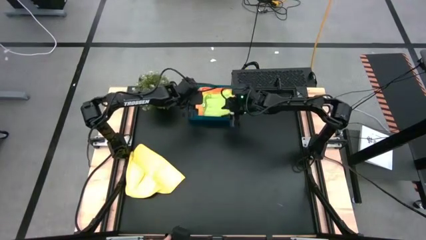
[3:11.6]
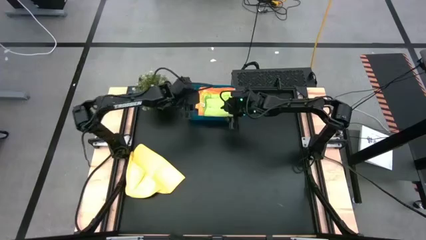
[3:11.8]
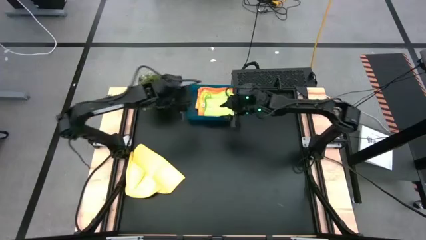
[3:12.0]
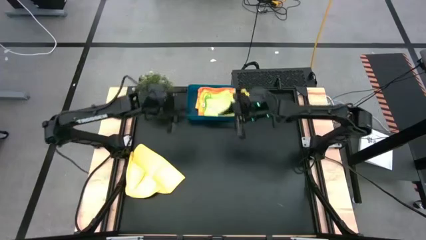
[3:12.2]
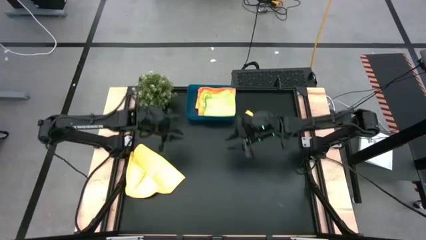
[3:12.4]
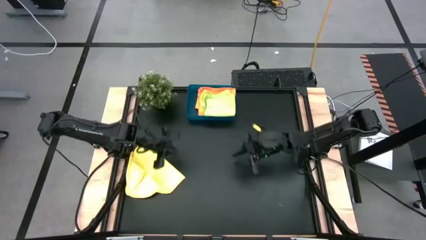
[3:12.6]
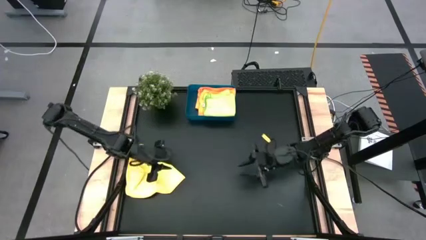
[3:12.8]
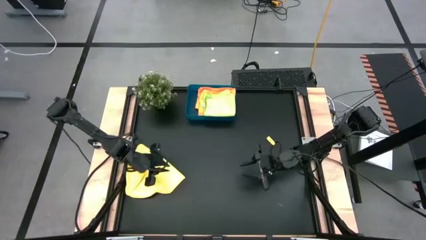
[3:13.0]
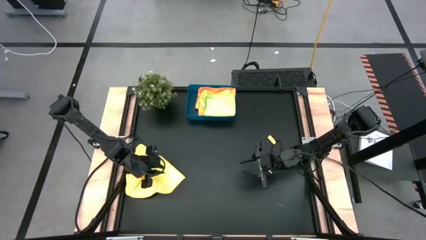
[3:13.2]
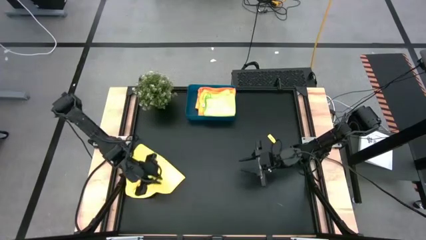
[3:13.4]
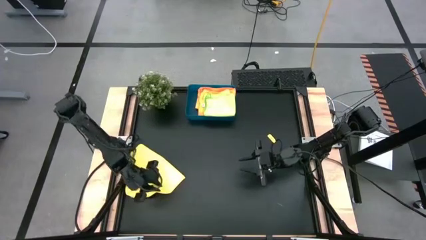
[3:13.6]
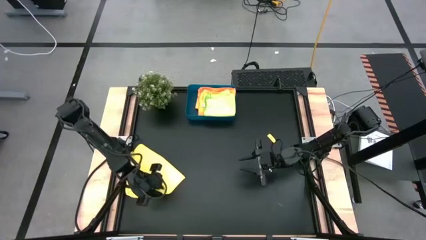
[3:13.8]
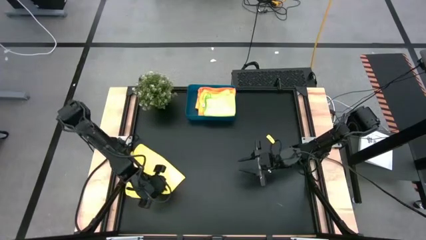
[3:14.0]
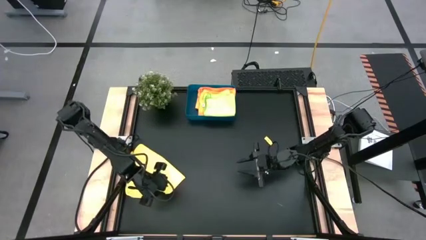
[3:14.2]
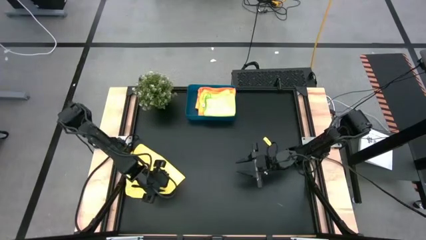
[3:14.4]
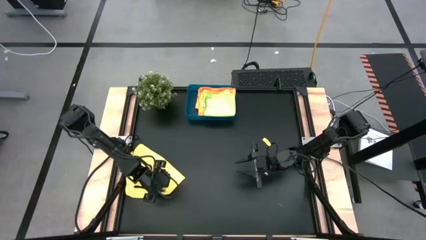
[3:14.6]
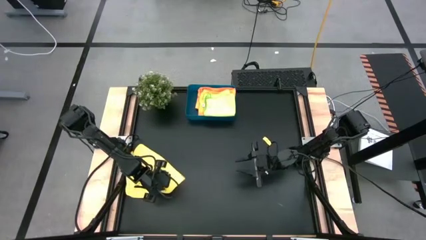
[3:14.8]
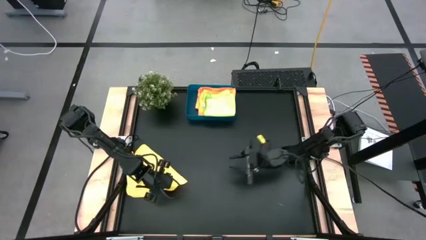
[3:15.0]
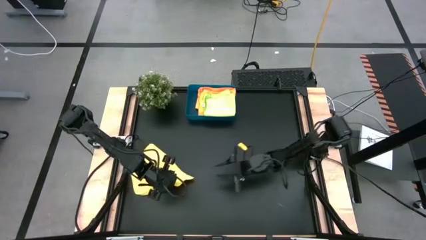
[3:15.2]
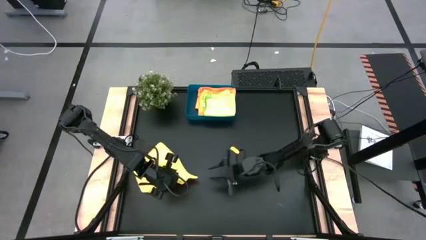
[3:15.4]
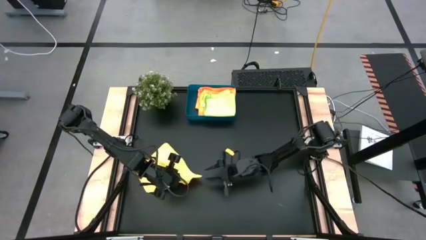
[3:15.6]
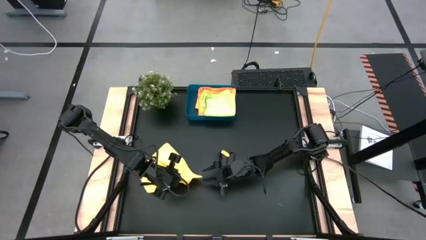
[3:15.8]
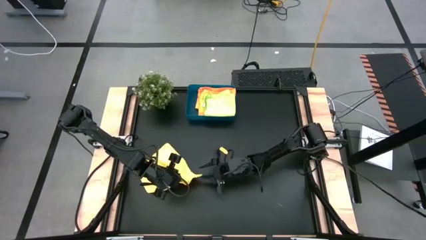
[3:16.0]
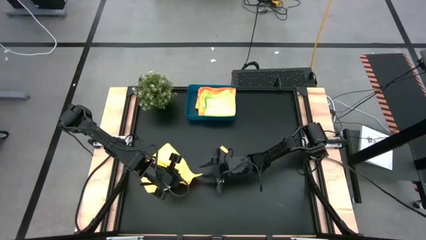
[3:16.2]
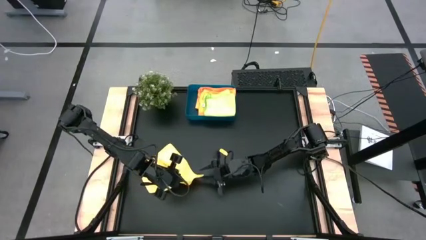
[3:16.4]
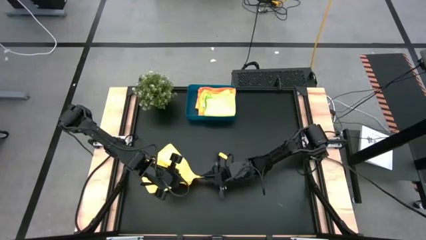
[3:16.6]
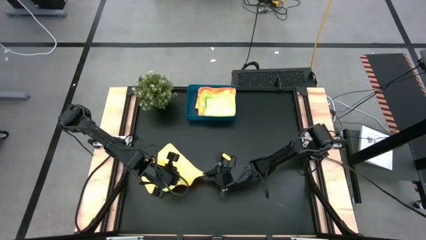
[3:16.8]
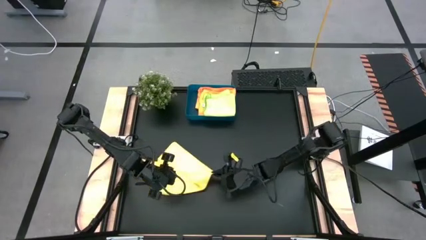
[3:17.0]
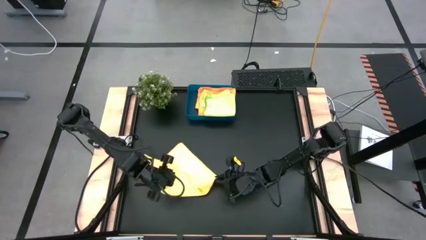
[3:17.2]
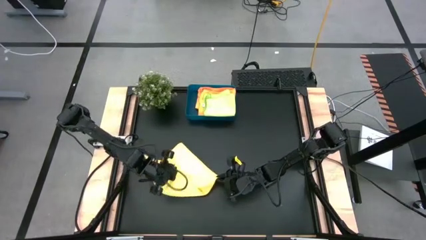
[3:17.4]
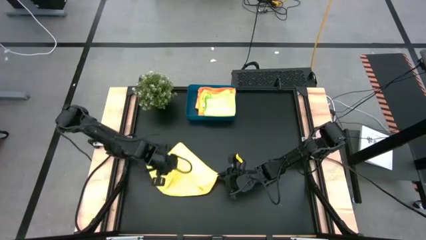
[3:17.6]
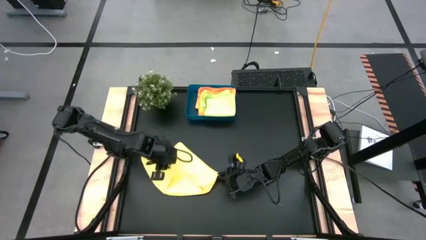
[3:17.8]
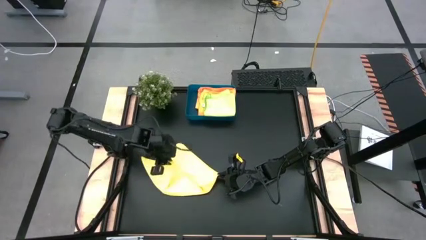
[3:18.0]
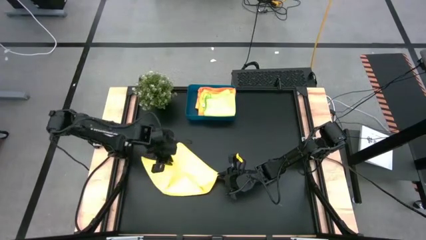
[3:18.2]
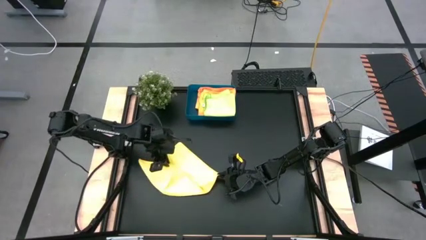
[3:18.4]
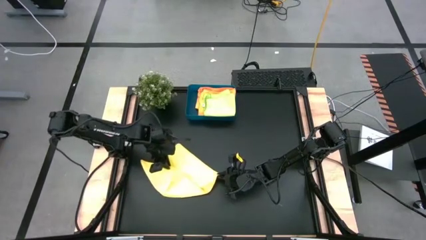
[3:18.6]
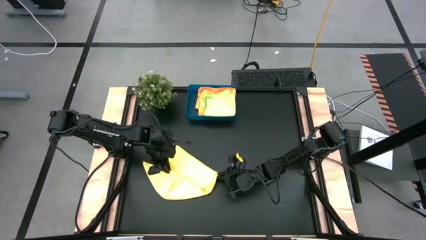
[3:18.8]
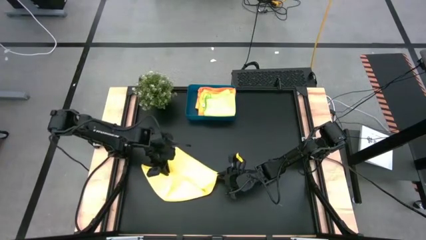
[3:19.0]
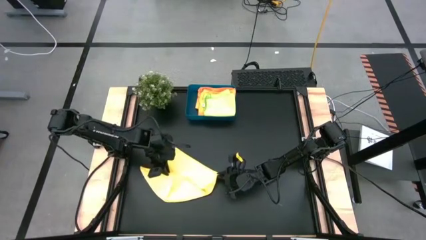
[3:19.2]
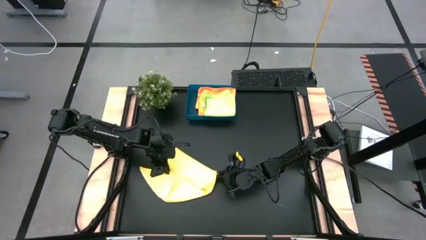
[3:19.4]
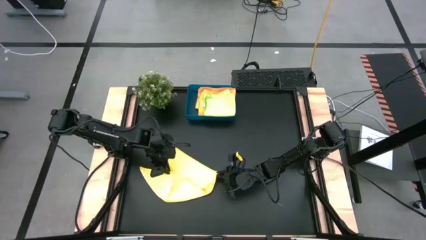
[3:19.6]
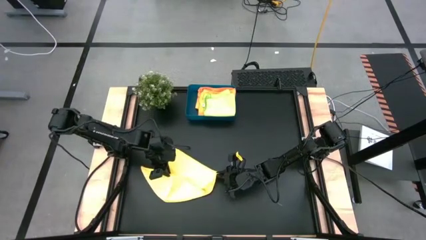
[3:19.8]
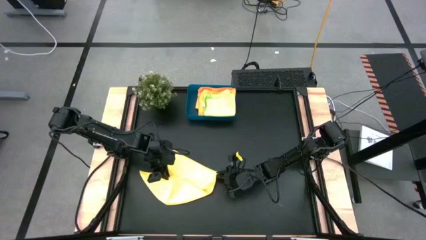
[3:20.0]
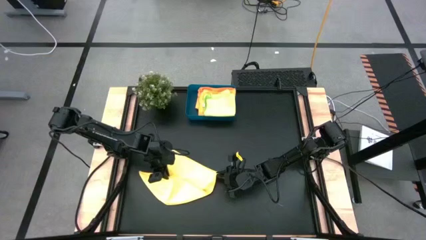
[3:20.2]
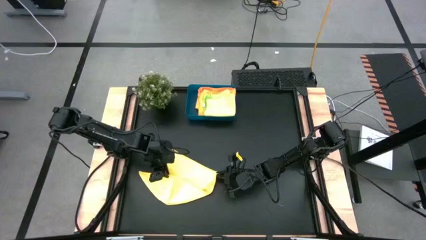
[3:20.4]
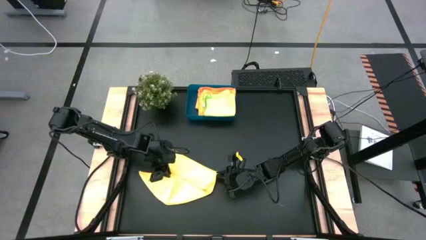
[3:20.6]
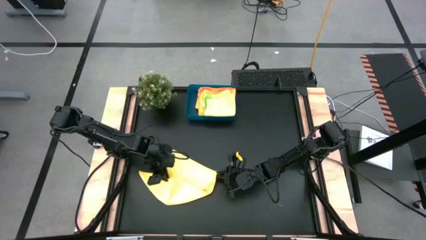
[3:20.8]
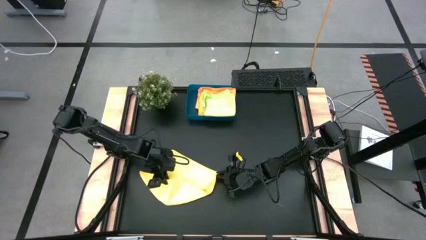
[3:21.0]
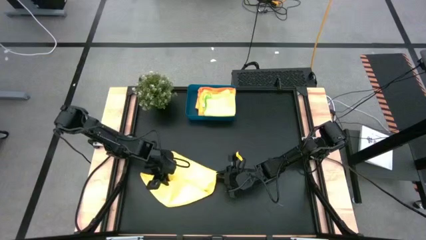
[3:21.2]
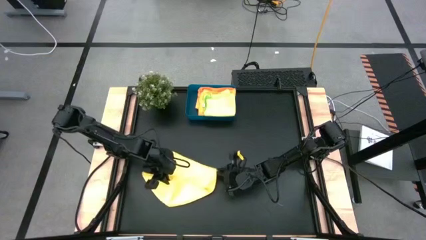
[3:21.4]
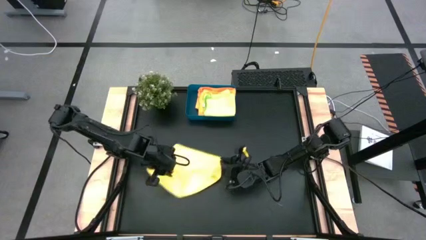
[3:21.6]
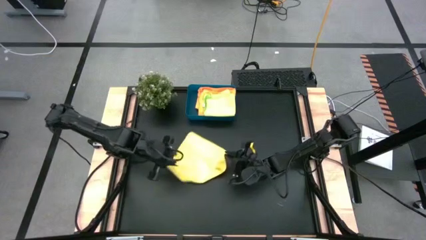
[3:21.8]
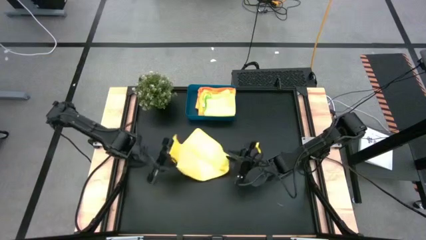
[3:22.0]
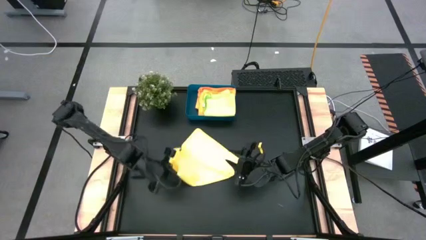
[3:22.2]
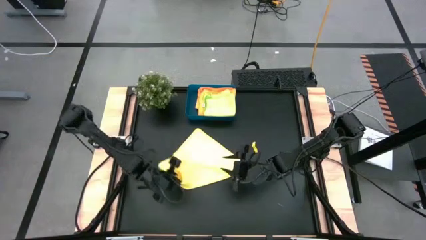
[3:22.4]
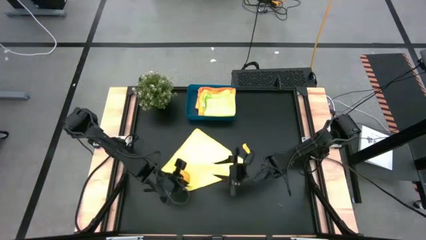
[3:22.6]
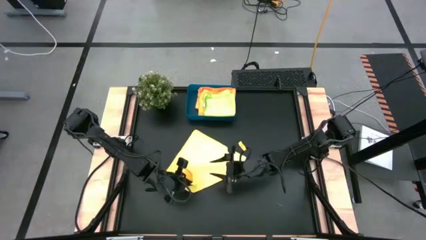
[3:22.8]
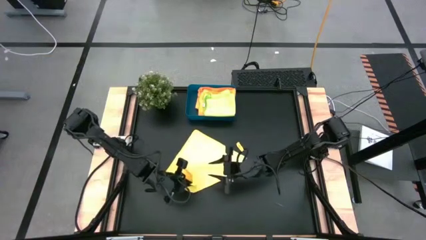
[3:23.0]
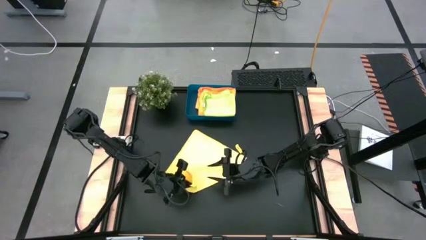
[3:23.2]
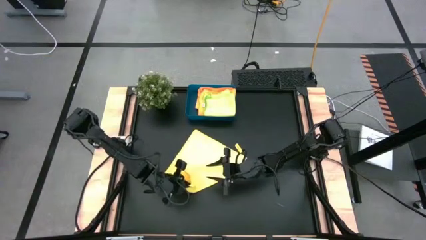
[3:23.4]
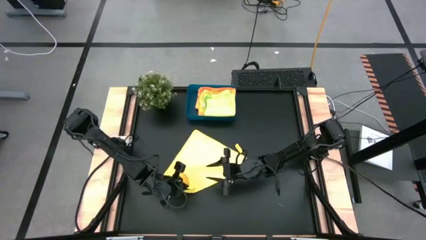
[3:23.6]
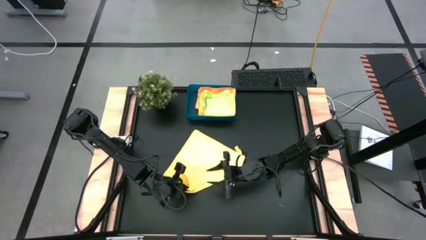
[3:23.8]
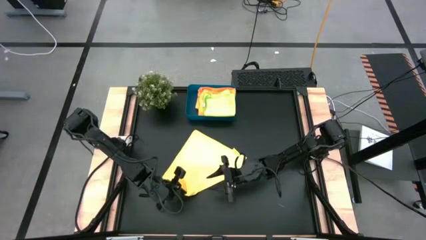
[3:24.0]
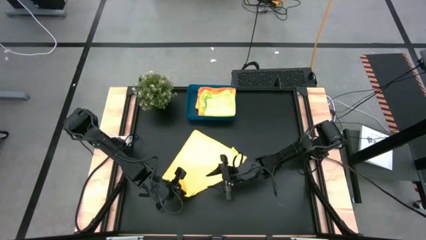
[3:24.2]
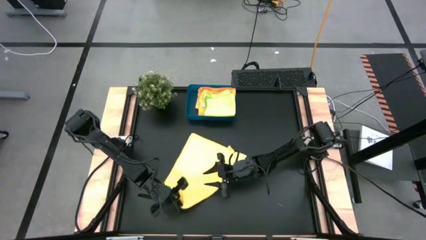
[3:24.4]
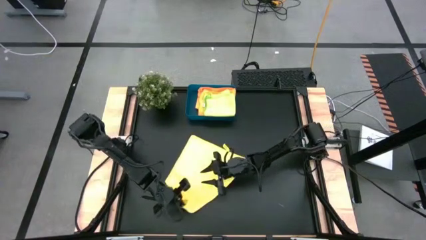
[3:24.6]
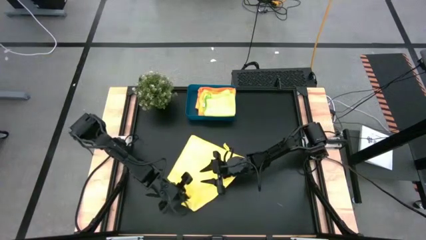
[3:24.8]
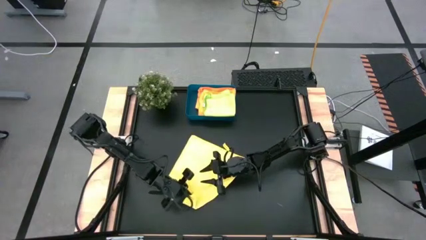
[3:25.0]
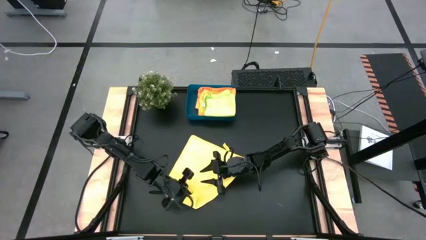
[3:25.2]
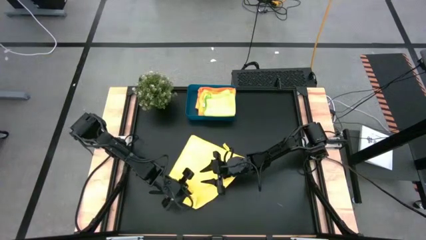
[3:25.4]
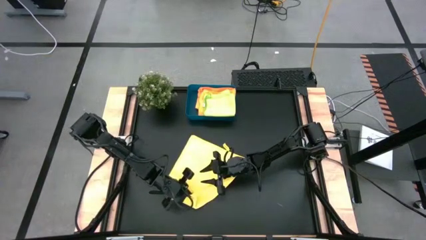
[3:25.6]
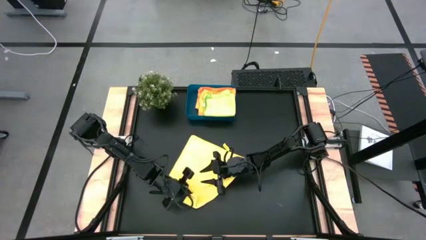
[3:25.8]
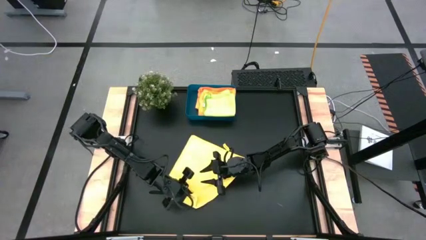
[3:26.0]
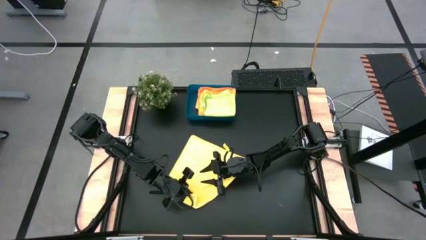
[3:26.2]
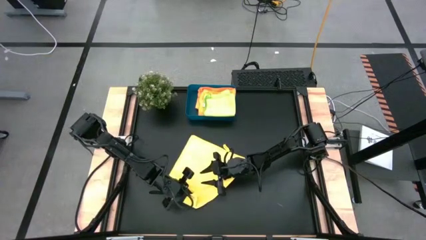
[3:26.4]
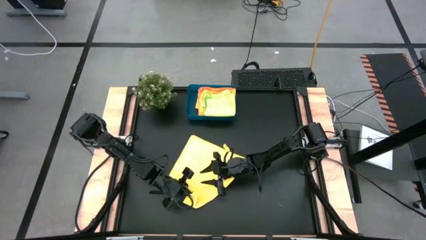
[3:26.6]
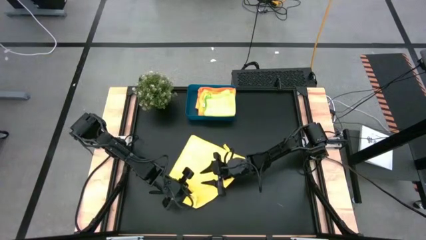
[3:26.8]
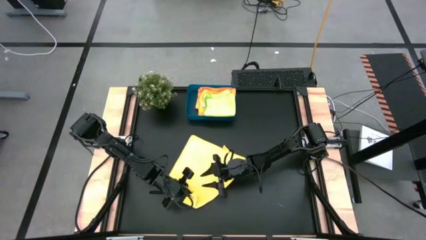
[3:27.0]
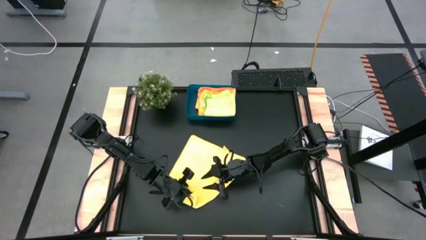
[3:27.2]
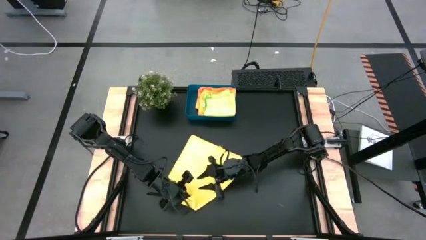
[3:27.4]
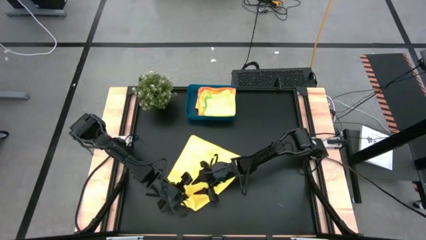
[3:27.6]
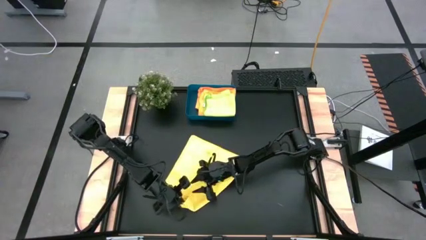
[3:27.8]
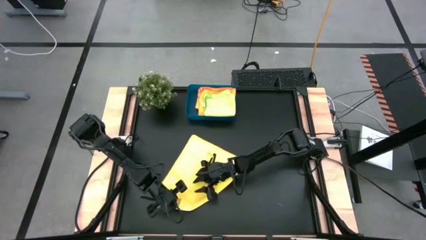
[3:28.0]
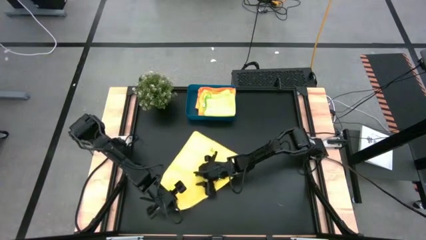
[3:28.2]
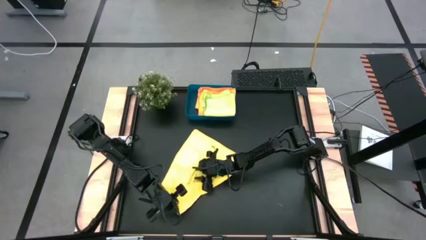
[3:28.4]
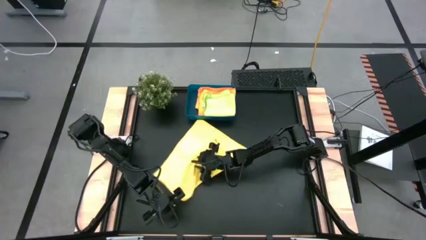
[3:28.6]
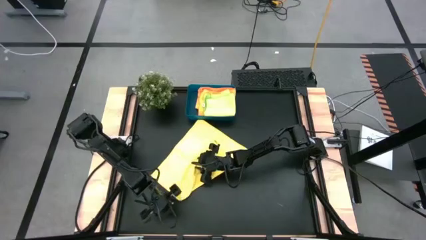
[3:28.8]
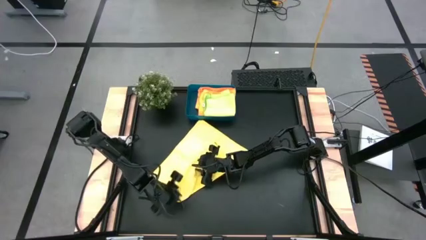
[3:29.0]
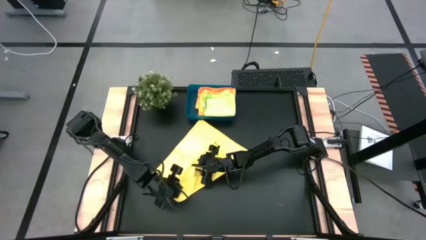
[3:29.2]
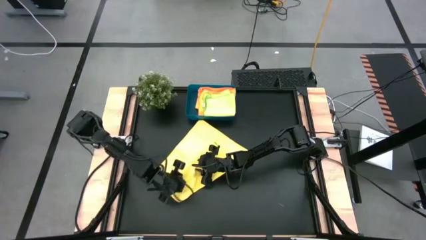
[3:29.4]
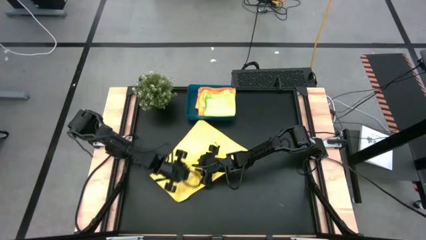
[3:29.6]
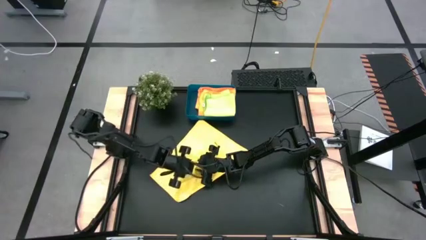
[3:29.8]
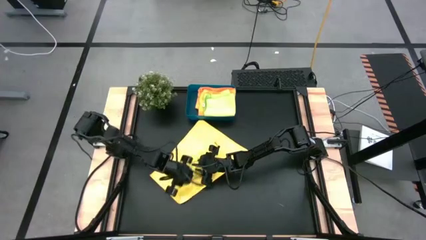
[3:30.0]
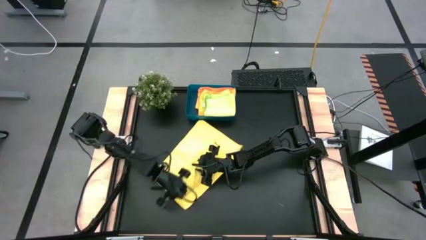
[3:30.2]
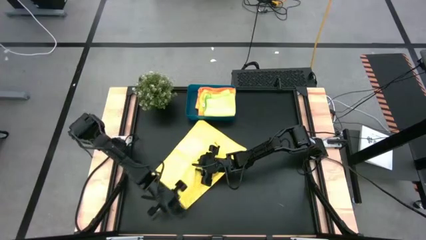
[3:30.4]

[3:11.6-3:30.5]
Task: Fold microfiber towels
Fold the yellow microfiber towel
